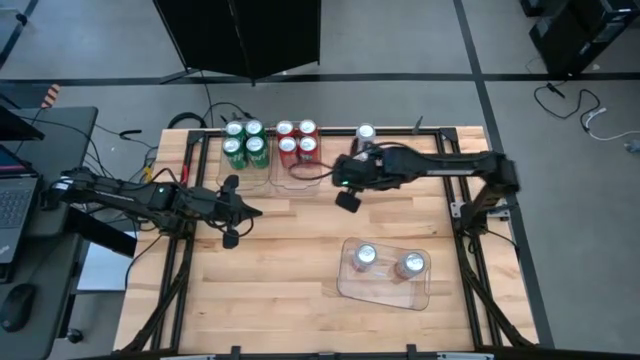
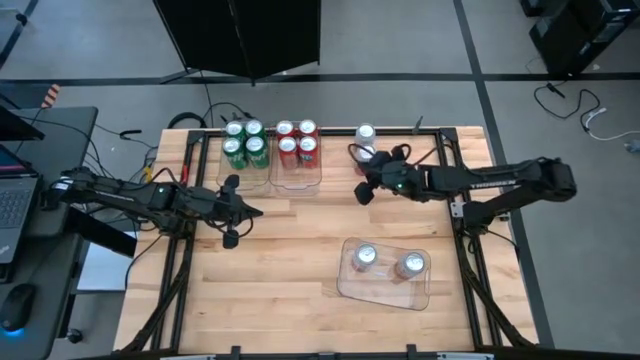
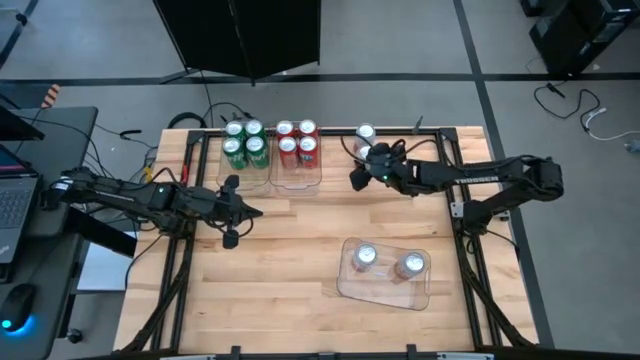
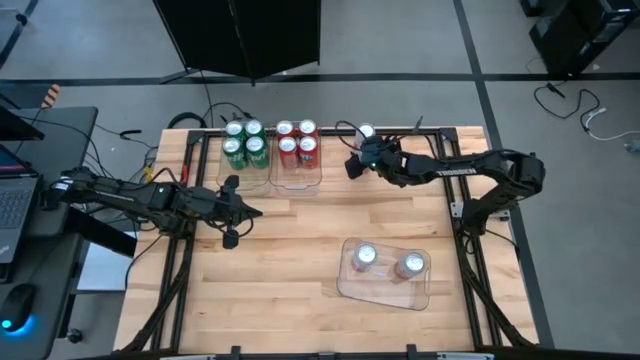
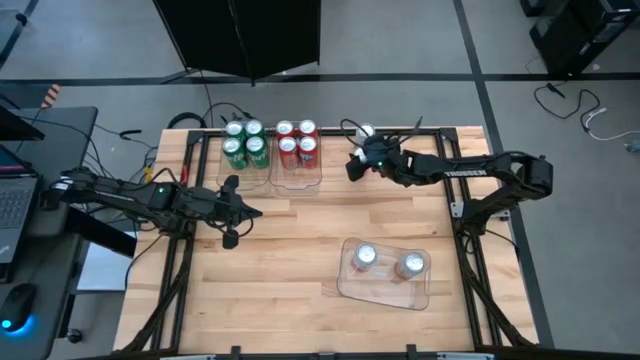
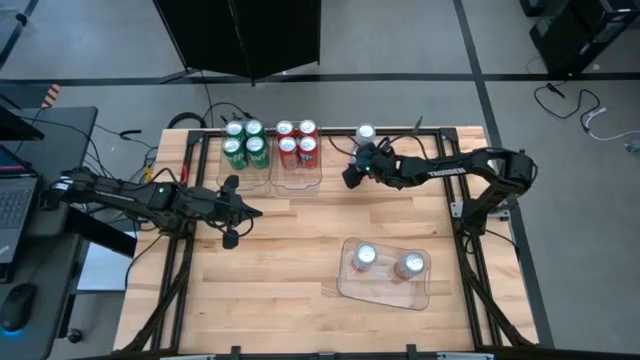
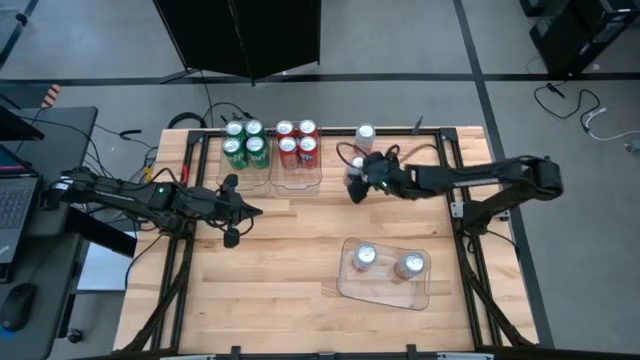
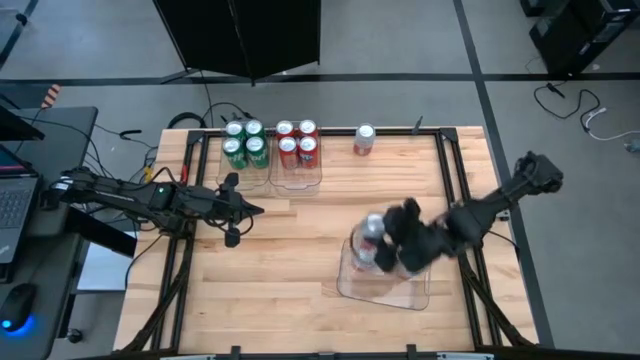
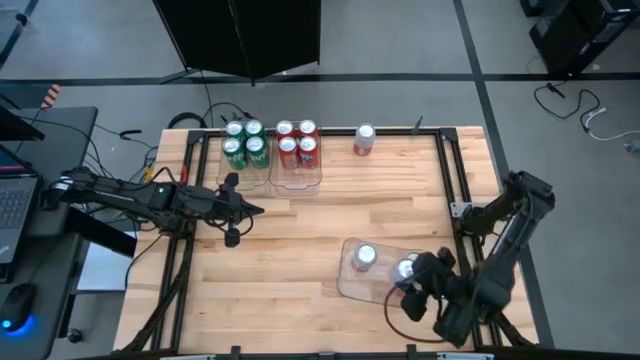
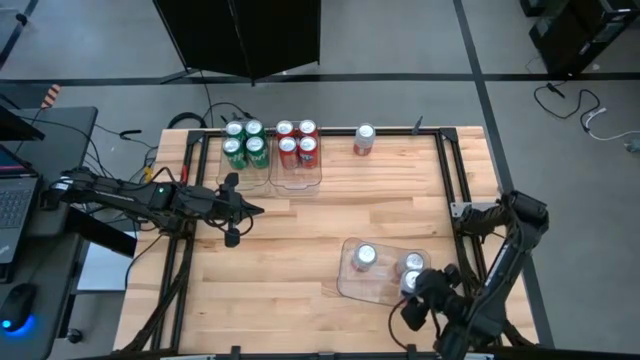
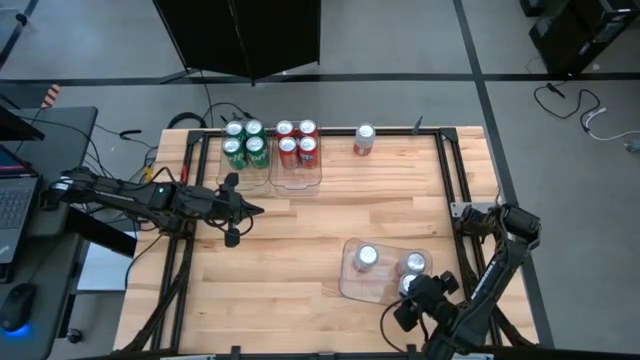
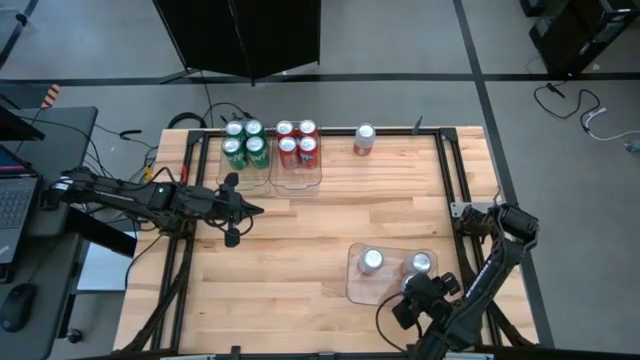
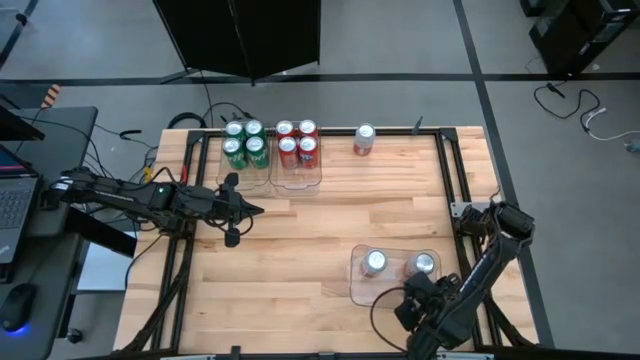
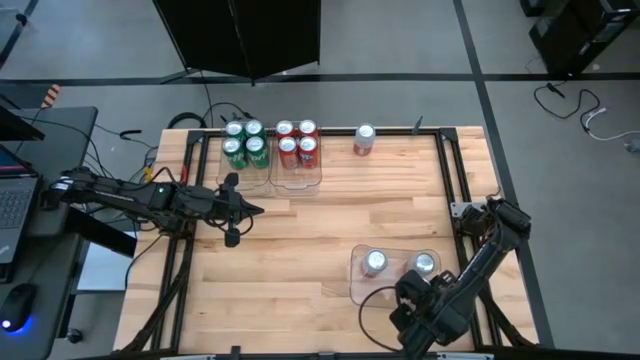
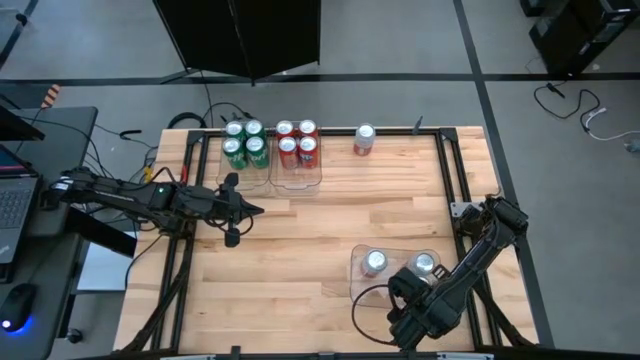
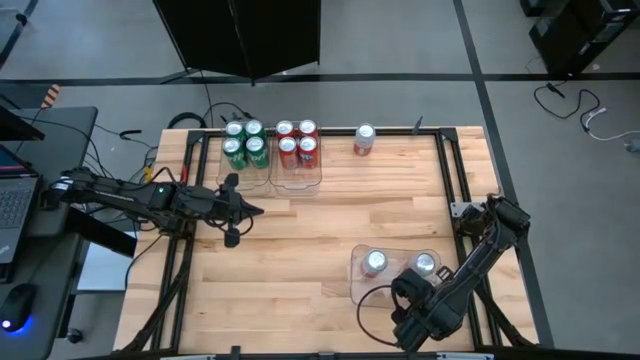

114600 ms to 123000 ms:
Task: Sort soda cans
Put the bottom pink and white soda can into the bottom right transparent bin

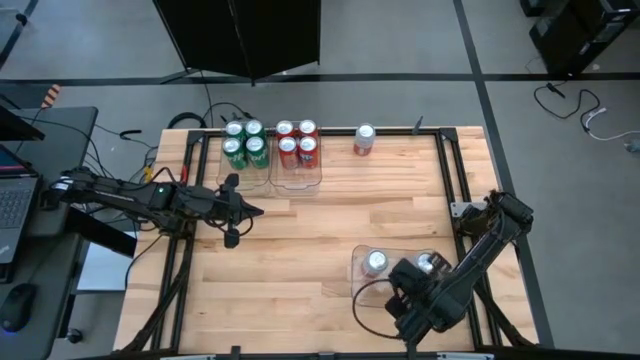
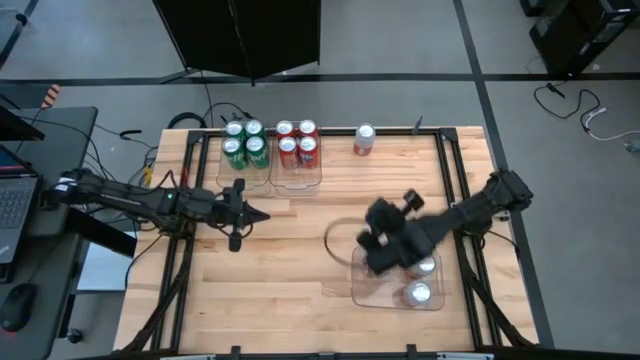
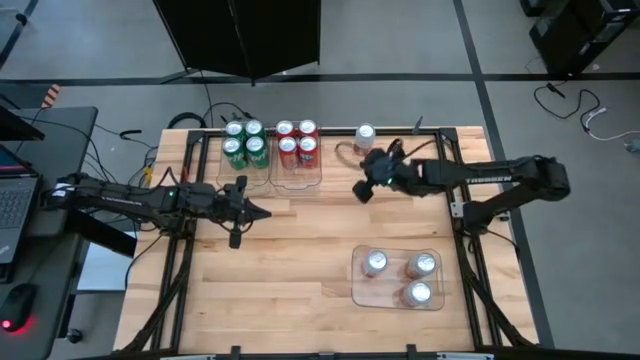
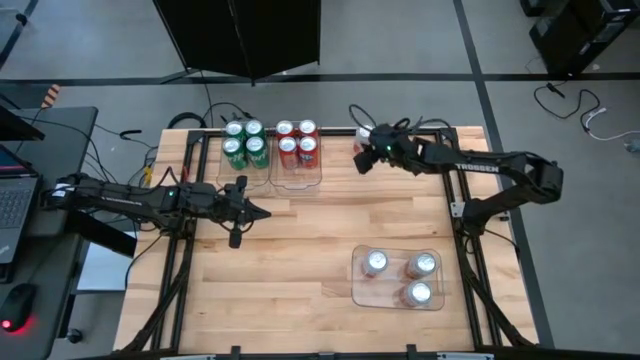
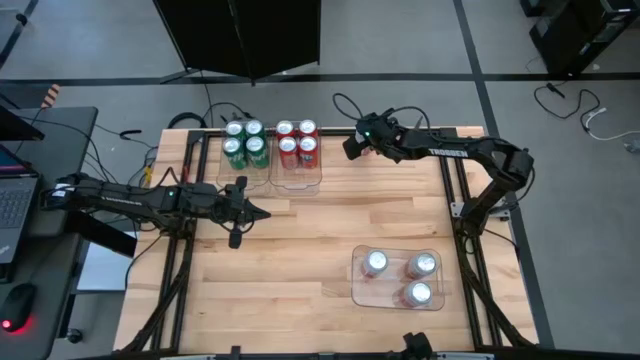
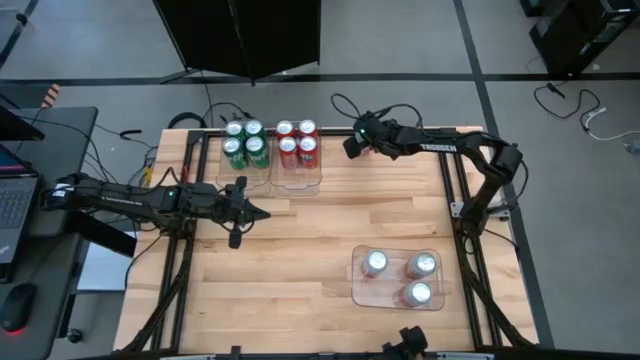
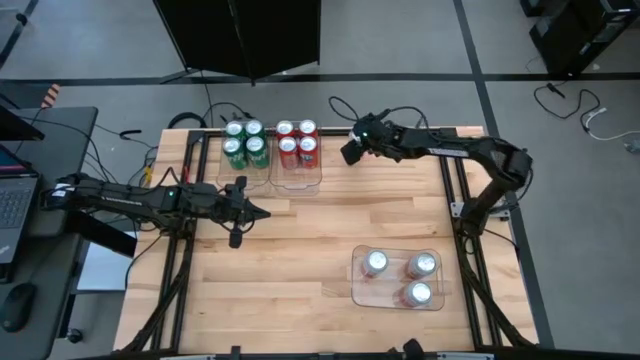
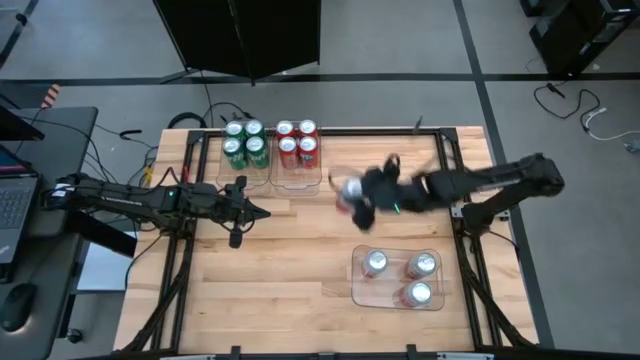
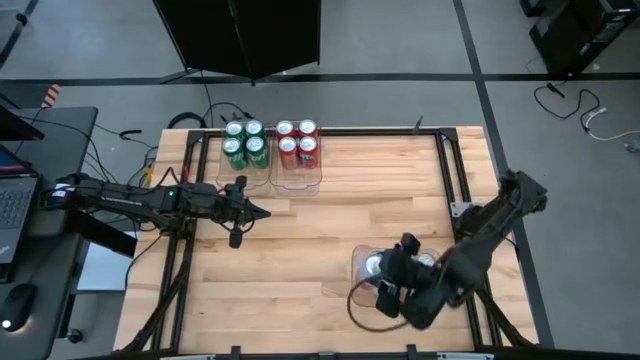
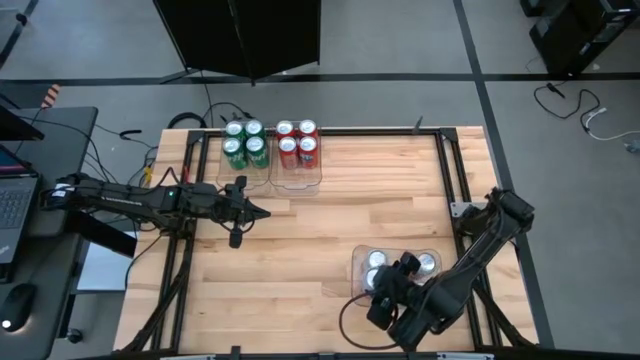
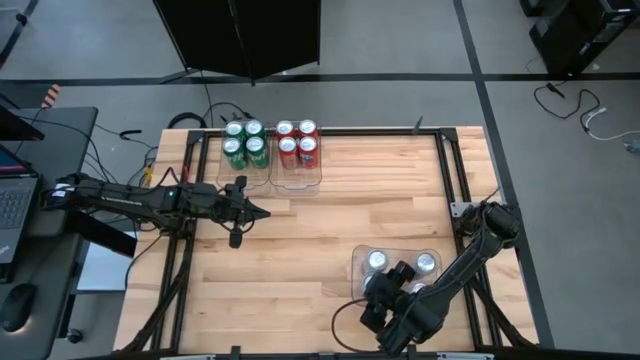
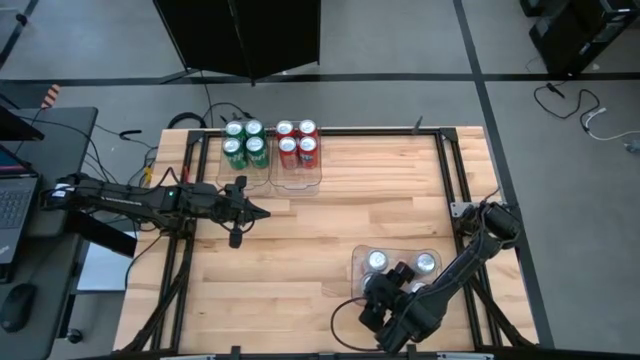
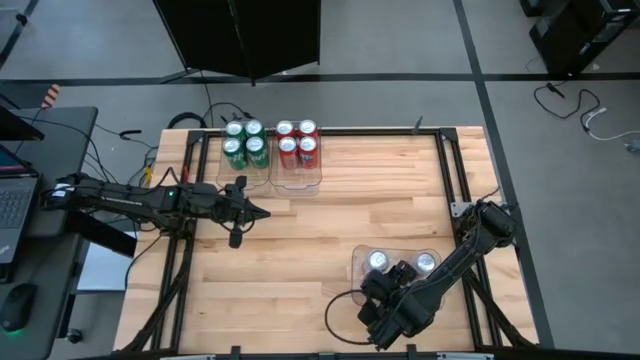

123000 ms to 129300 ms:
Put the pink and white soda can into the bottom right transparent bin

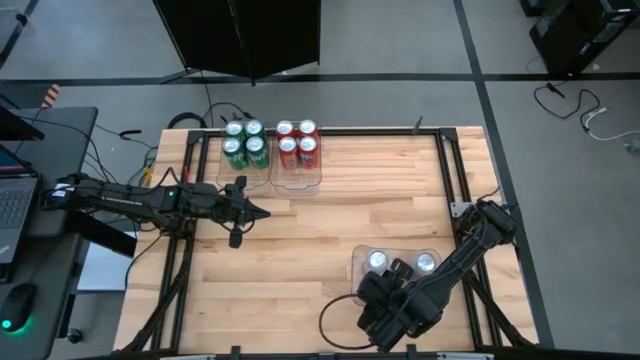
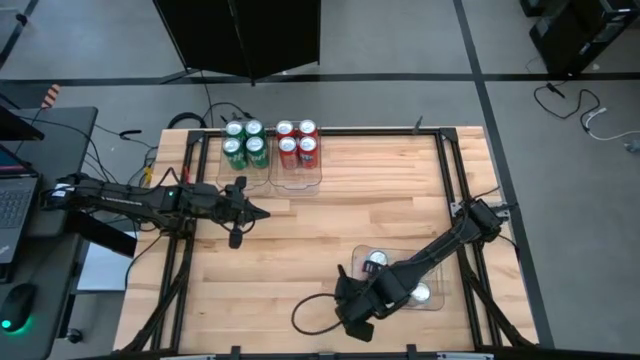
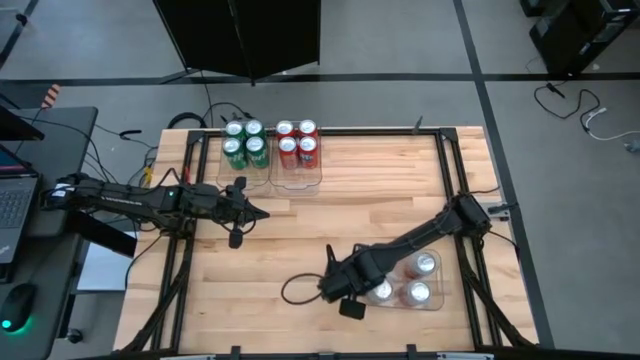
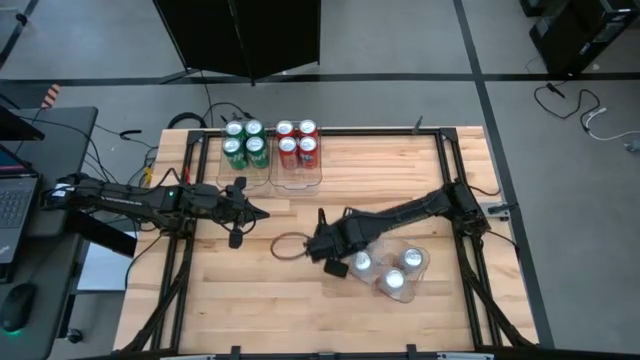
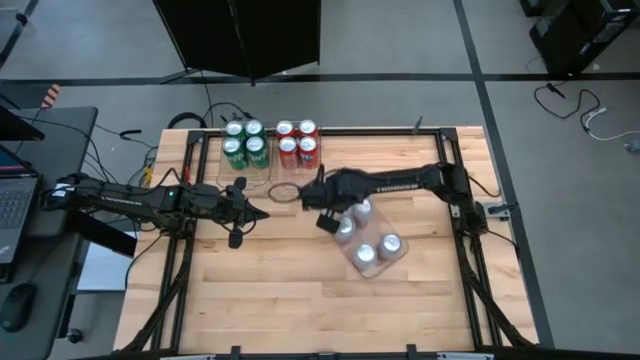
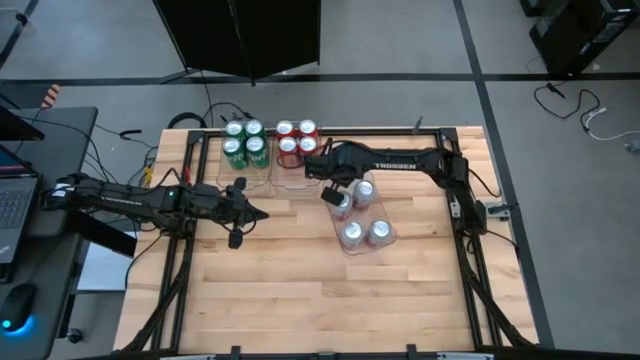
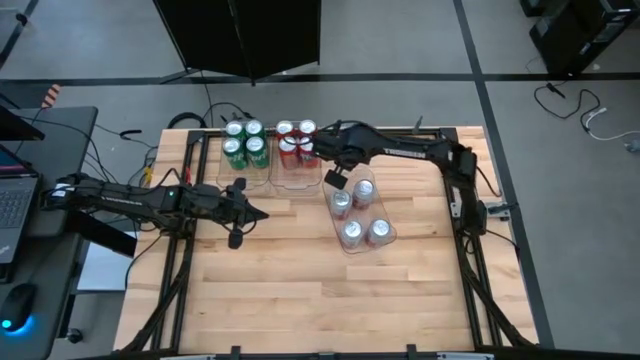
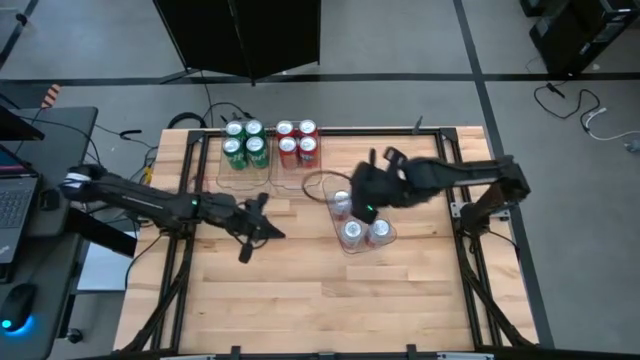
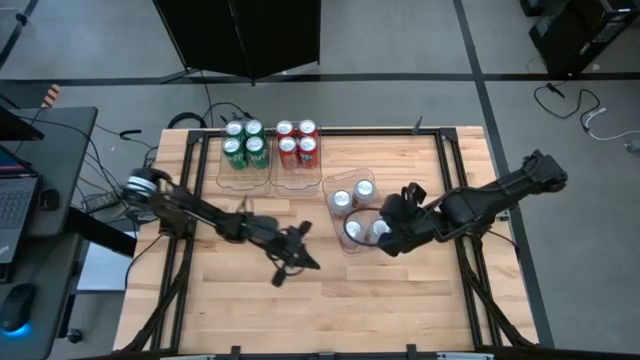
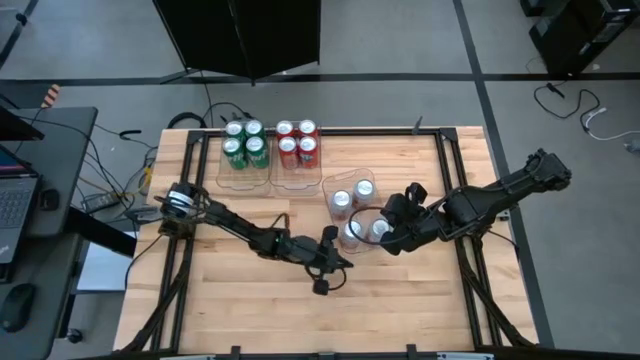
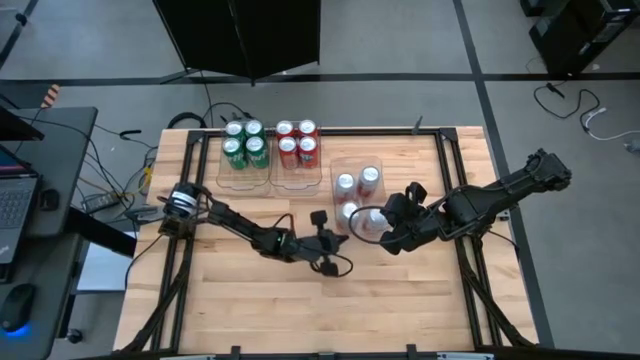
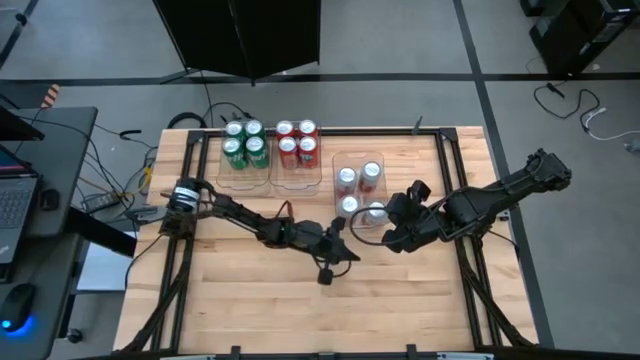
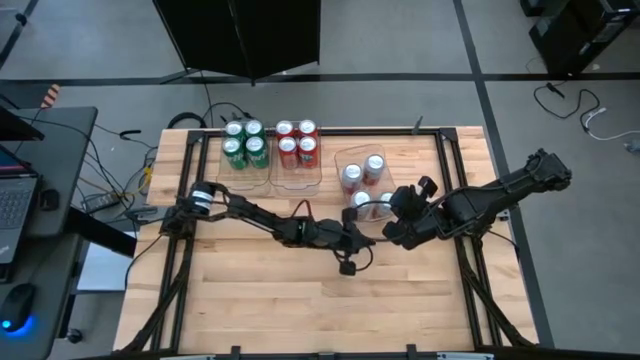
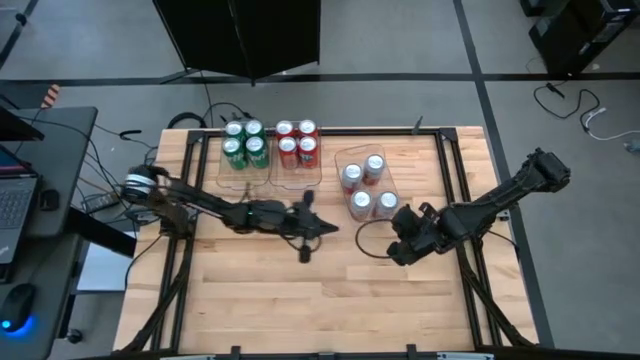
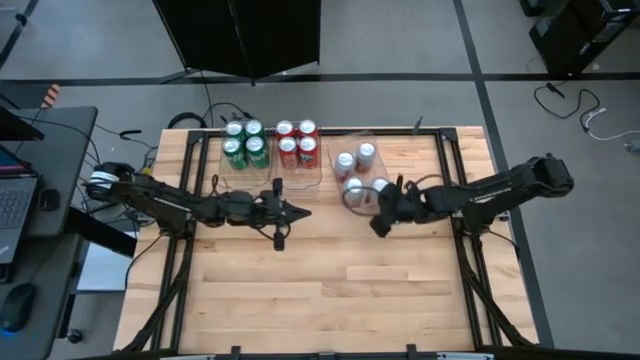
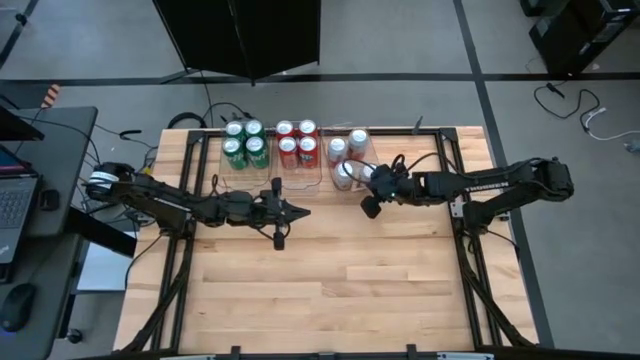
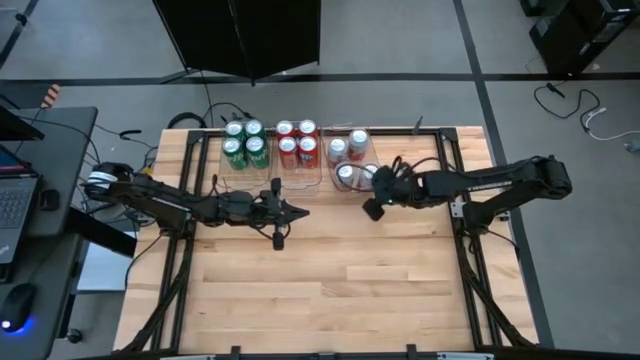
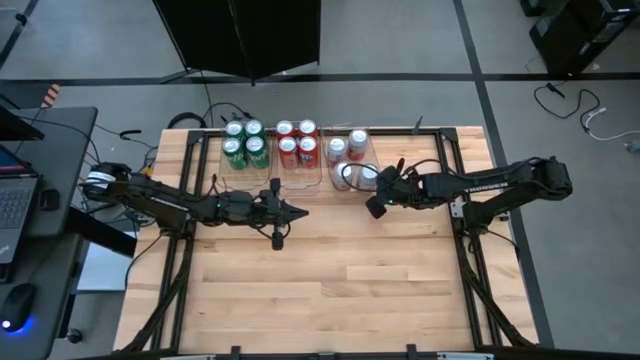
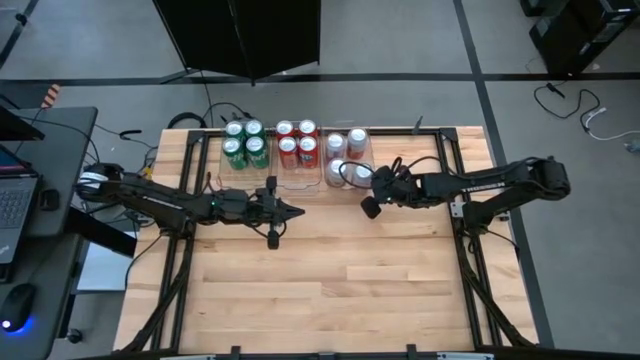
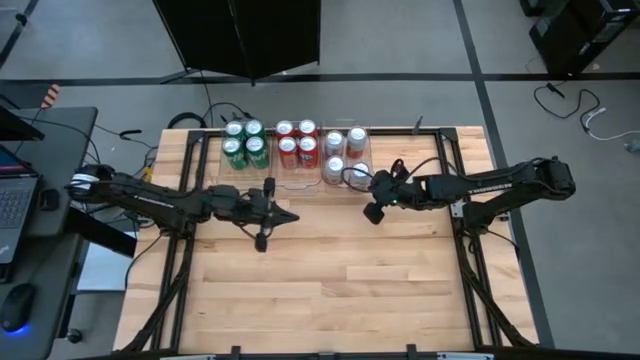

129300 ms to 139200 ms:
Move the bottom right transparent bin to the top right on the table
